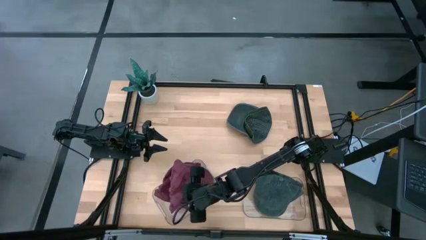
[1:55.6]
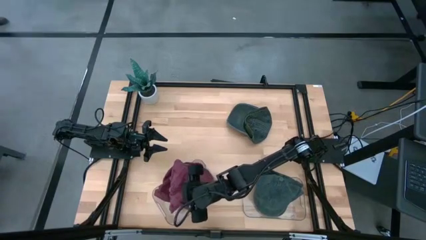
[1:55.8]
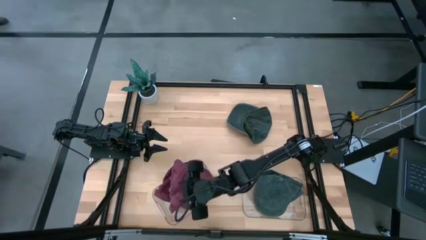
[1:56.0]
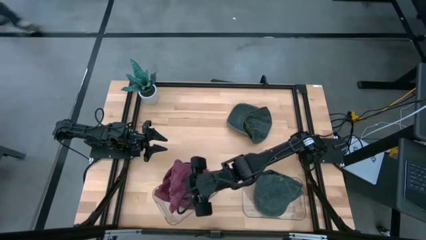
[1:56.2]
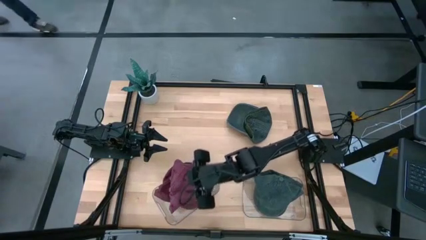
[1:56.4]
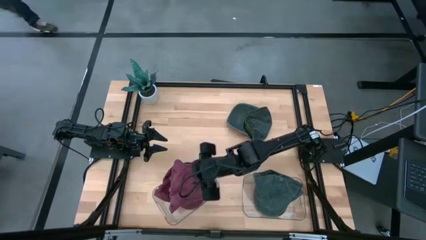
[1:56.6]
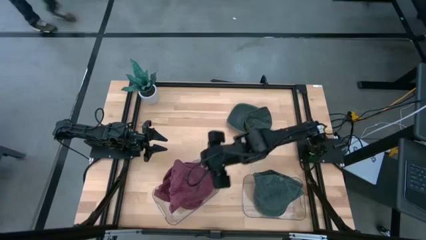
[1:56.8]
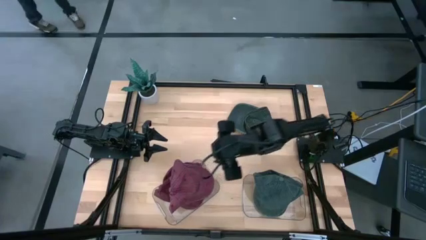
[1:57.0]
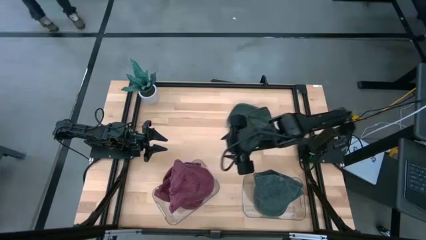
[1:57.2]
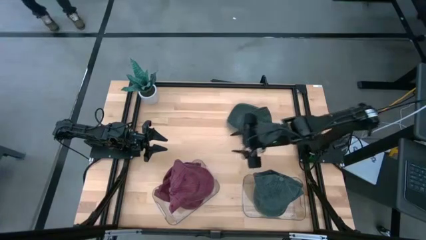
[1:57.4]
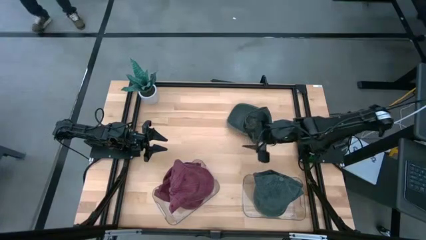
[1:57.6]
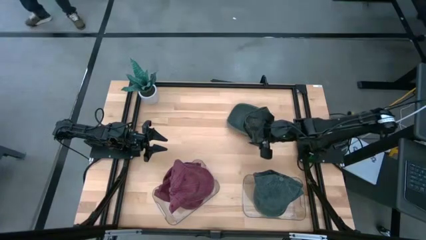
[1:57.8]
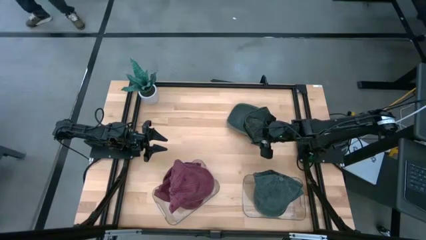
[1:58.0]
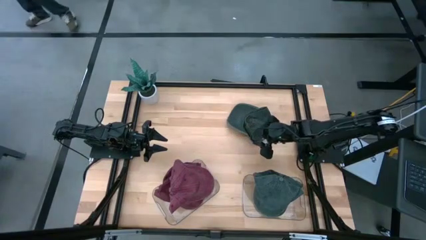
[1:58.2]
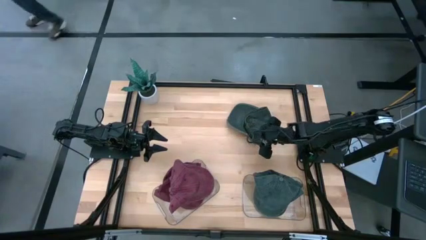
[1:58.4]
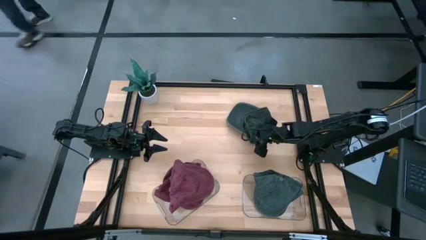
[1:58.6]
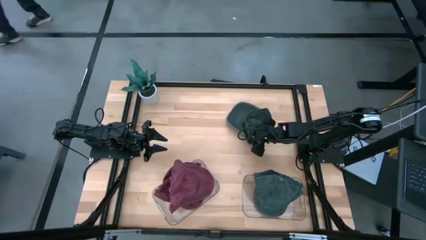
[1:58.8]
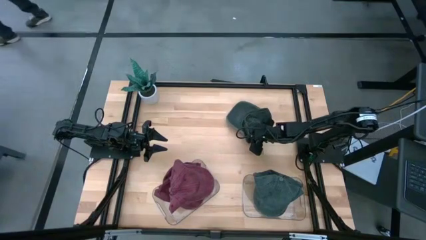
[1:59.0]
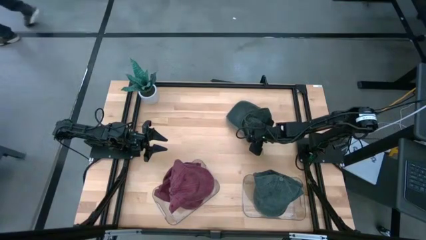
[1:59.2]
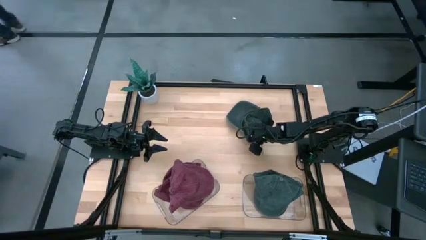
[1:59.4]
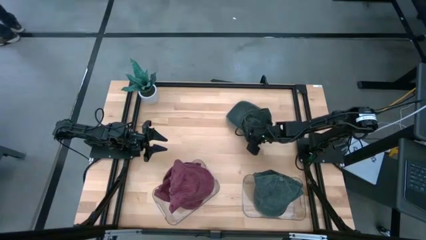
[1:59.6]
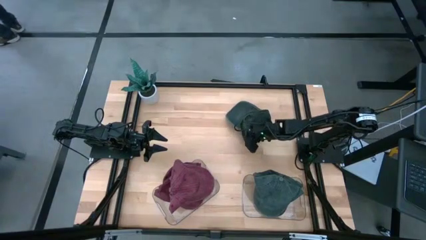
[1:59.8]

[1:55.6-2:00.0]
Task: Pick & Place hat
Put the gray cap into the right transparent bin

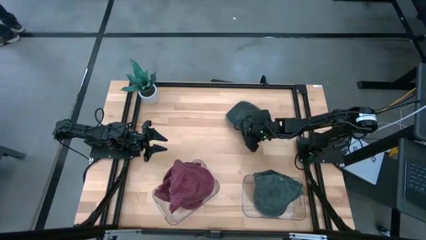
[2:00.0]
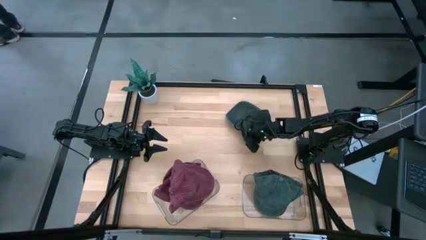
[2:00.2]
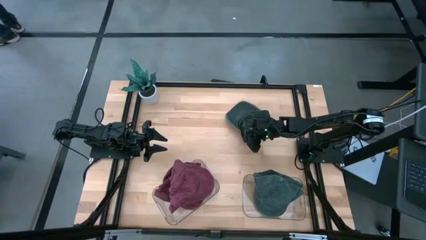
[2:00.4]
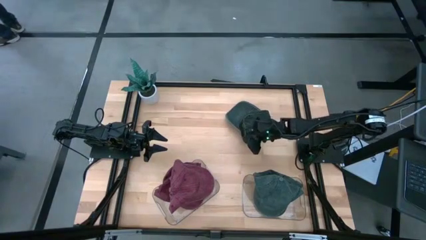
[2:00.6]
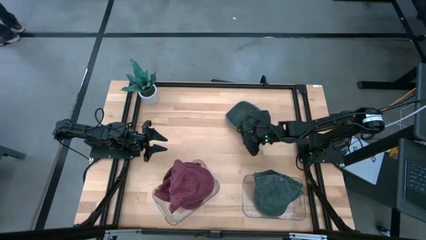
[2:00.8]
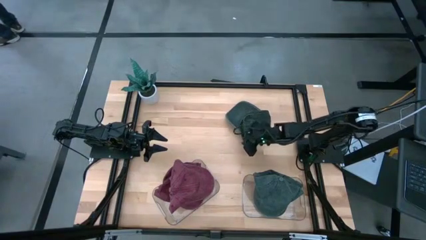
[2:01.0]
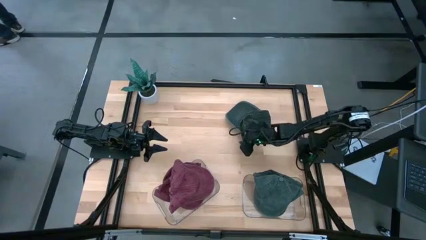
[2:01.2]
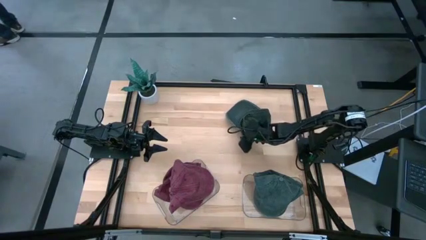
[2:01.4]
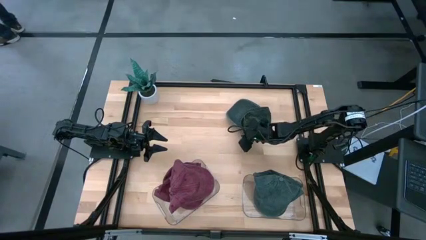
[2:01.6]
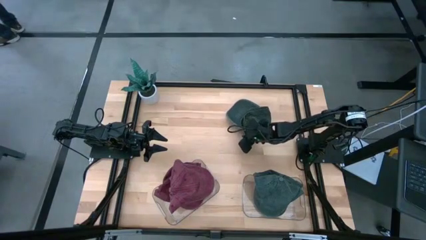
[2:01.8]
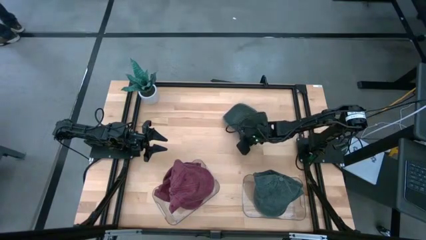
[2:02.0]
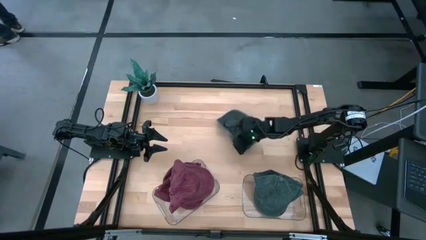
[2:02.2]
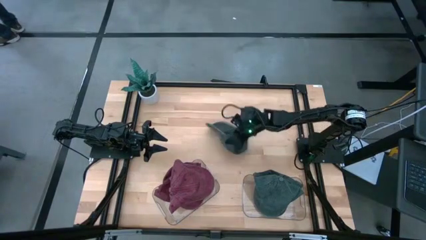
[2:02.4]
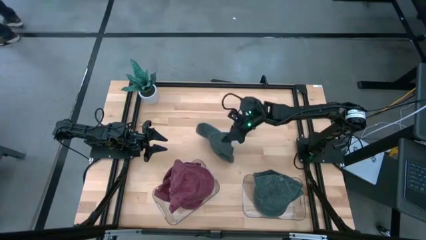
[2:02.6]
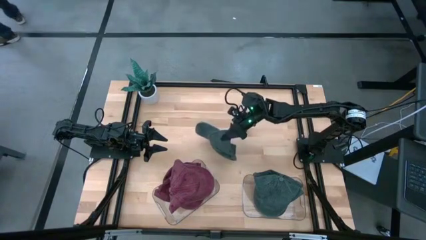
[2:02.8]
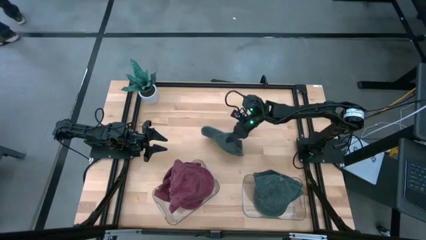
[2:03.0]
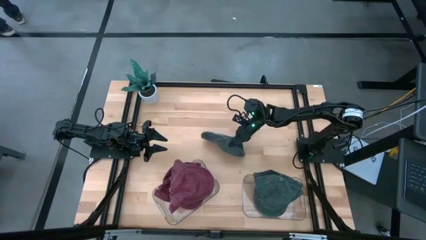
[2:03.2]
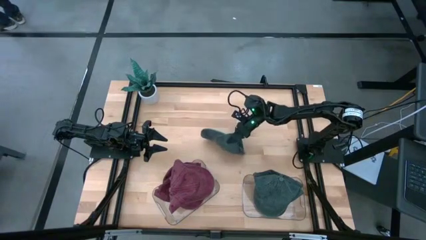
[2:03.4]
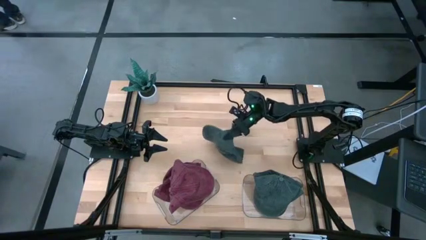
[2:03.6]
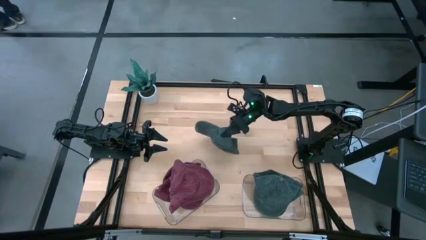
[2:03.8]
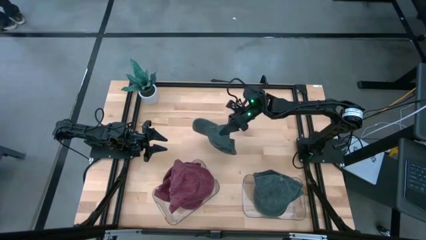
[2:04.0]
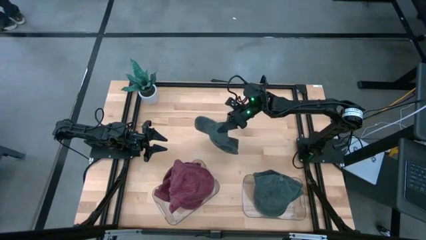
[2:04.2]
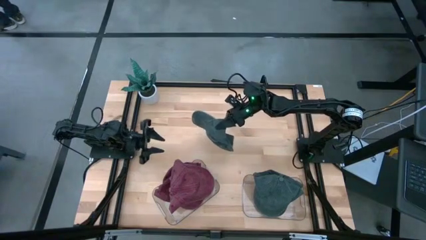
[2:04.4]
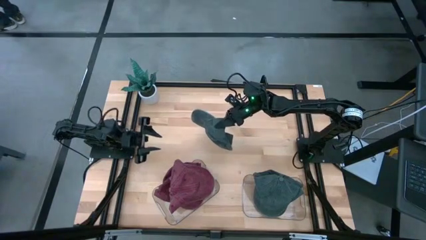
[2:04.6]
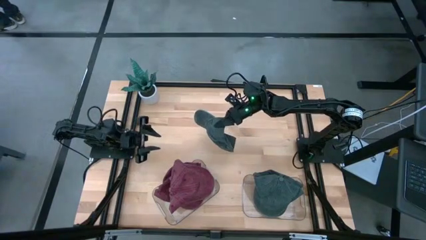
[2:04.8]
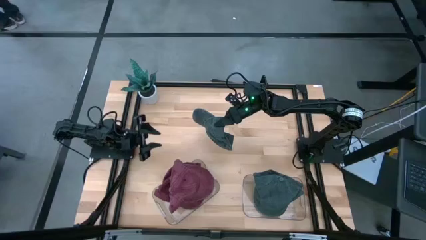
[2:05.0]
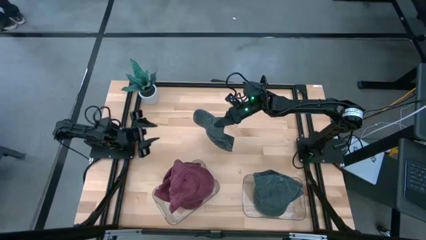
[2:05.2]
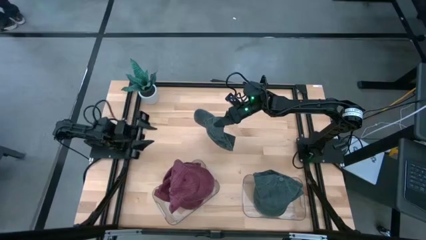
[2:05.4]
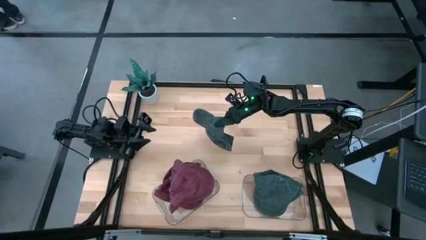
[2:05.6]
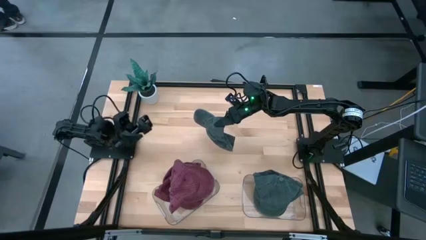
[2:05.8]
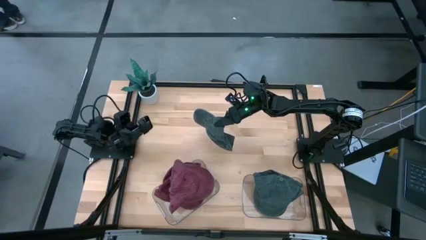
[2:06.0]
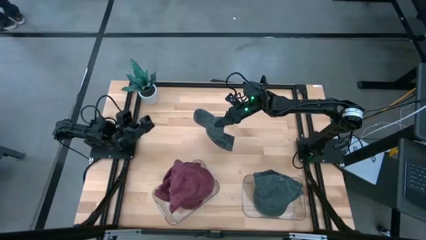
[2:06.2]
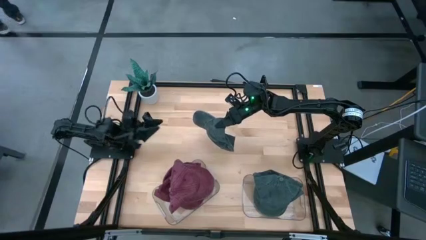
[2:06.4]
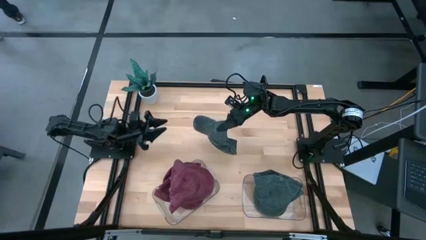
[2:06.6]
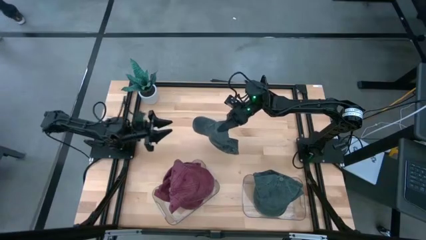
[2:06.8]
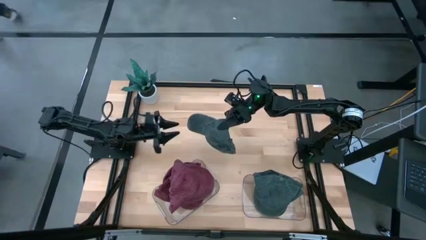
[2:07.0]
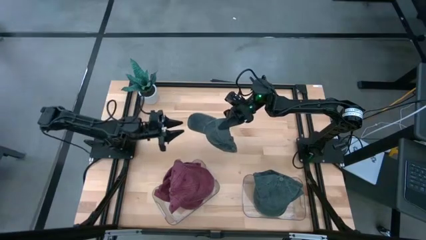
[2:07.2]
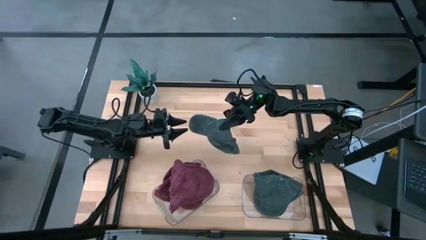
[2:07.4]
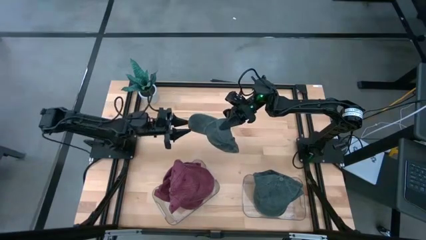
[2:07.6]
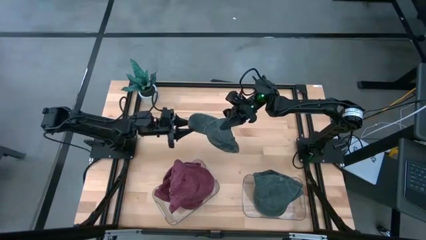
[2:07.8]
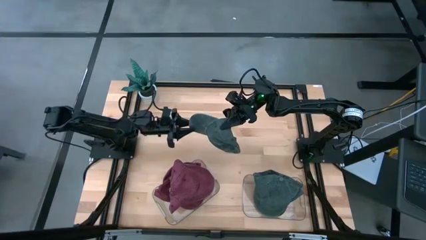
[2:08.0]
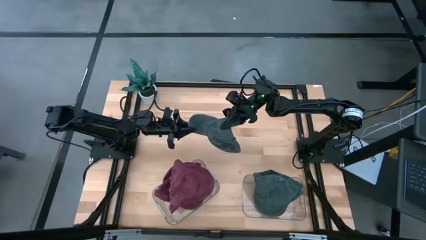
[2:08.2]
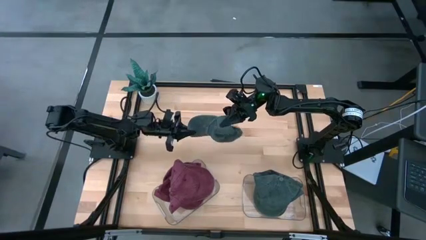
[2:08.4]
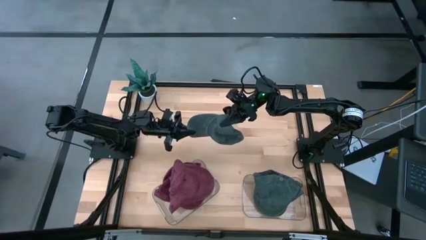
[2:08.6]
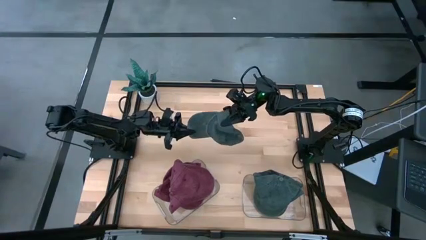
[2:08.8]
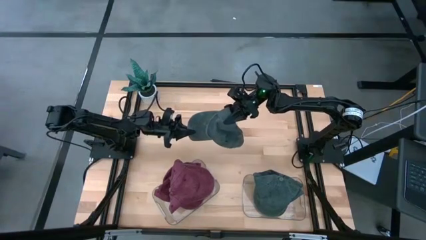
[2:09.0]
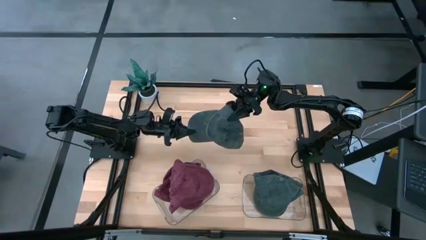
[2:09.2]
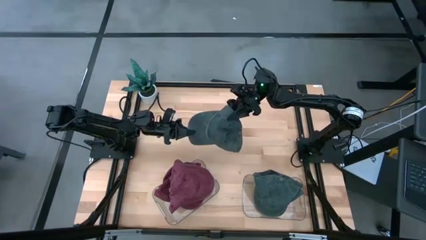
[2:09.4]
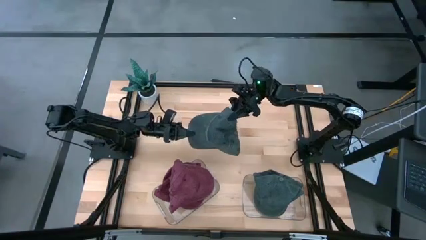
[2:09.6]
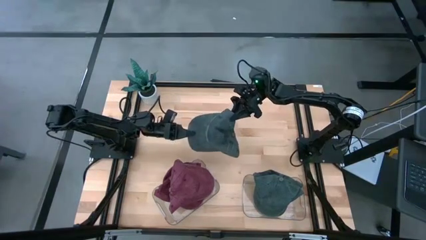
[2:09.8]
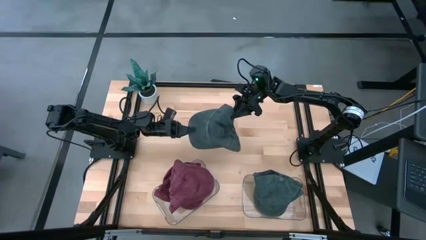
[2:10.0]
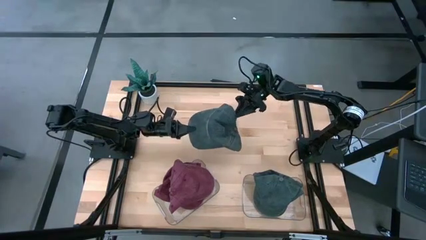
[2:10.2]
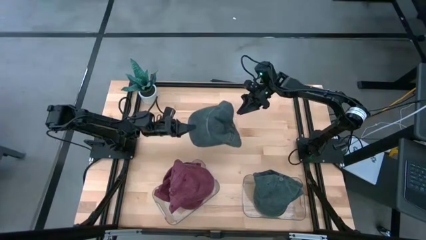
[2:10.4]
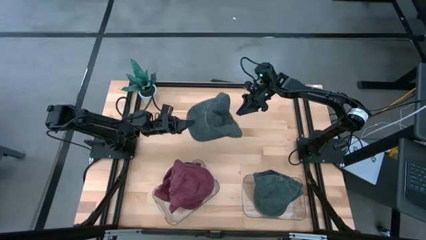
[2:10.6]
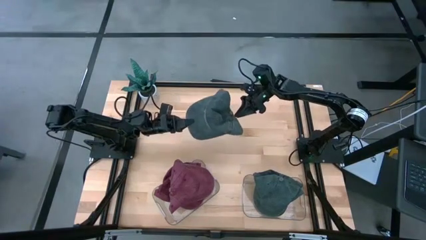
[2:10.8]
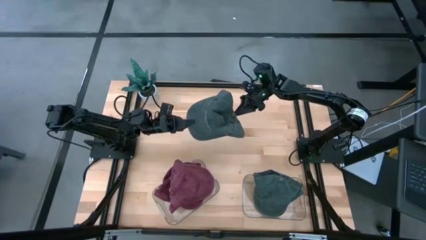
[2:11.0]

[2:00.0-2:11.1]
Put the gray cap into the right transparent bin
